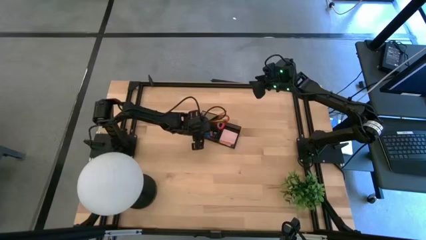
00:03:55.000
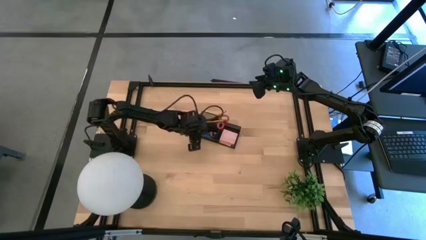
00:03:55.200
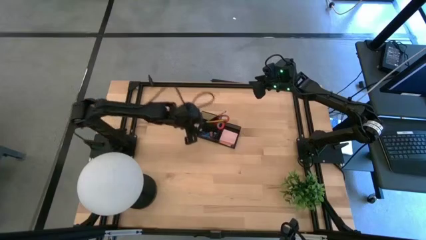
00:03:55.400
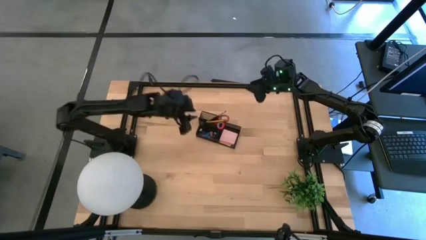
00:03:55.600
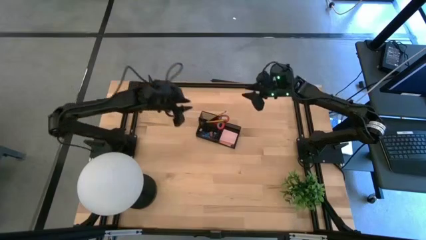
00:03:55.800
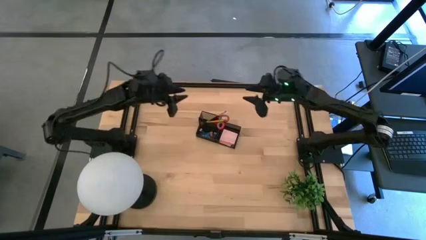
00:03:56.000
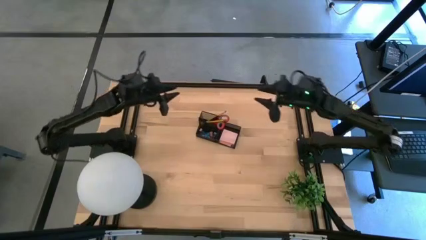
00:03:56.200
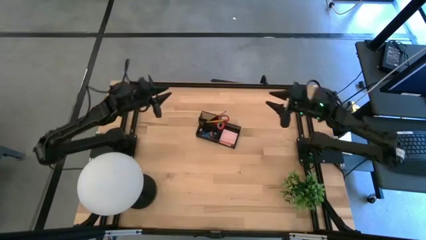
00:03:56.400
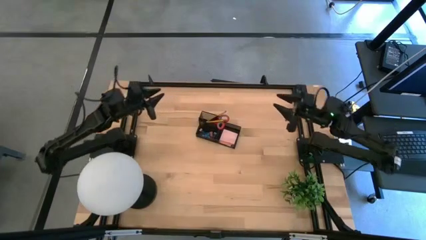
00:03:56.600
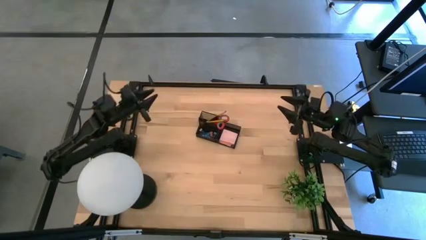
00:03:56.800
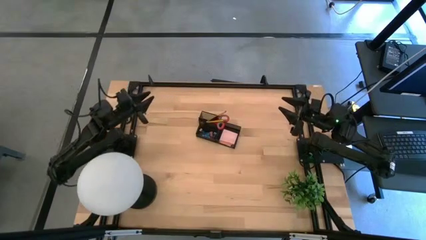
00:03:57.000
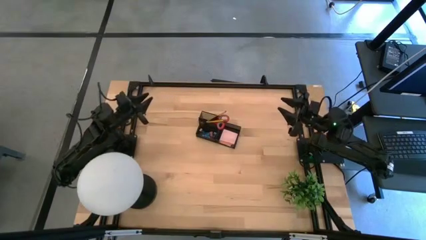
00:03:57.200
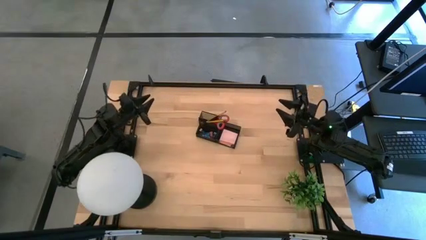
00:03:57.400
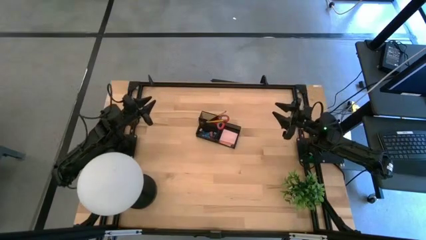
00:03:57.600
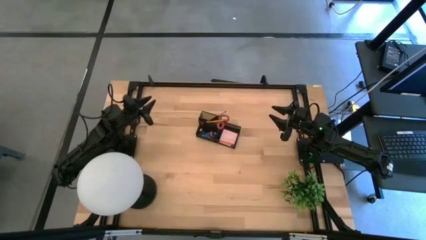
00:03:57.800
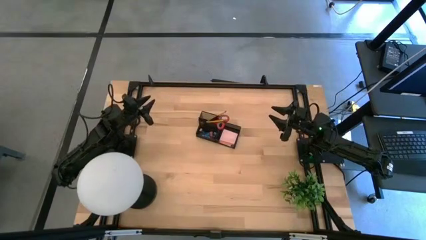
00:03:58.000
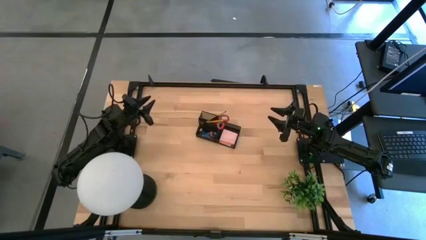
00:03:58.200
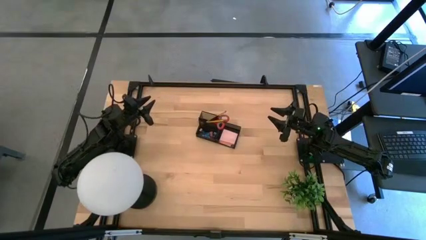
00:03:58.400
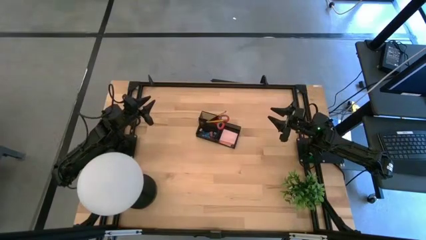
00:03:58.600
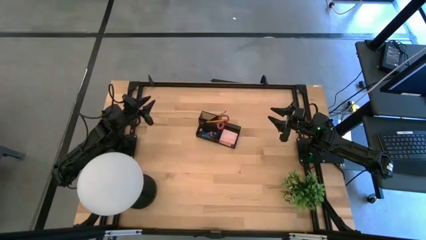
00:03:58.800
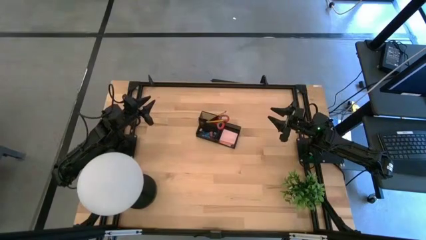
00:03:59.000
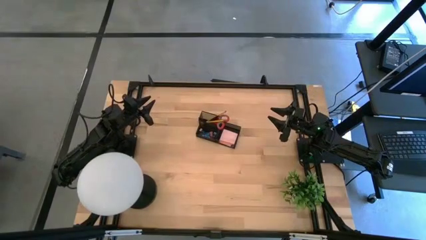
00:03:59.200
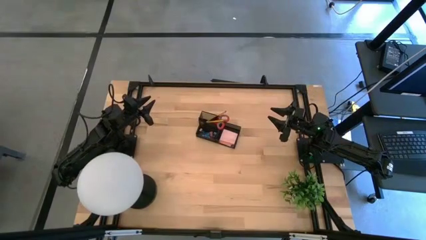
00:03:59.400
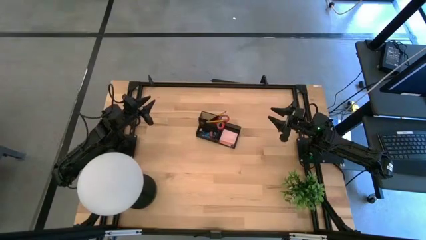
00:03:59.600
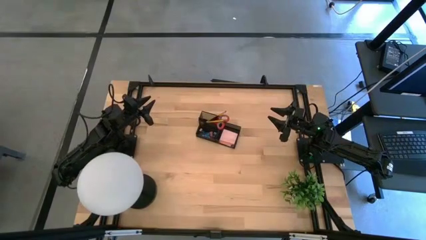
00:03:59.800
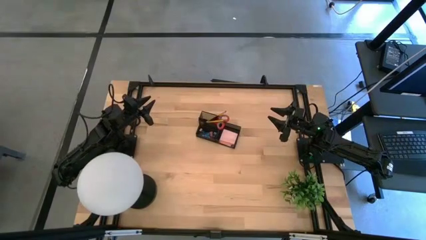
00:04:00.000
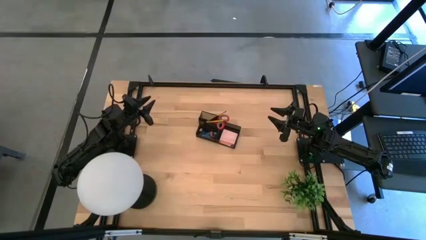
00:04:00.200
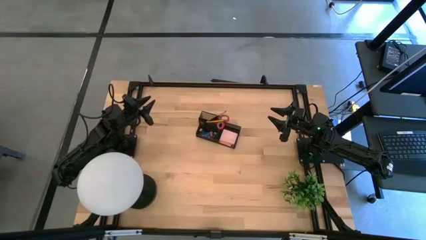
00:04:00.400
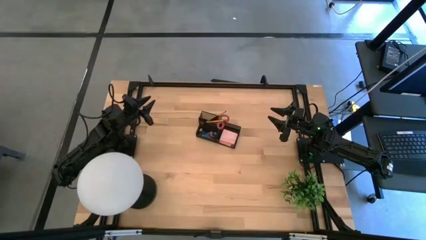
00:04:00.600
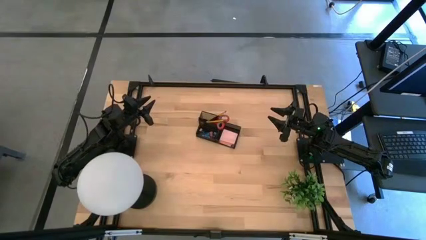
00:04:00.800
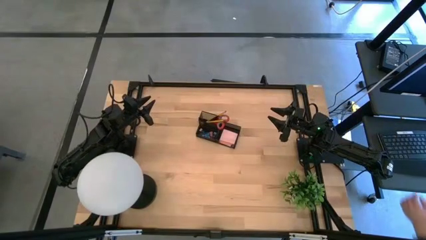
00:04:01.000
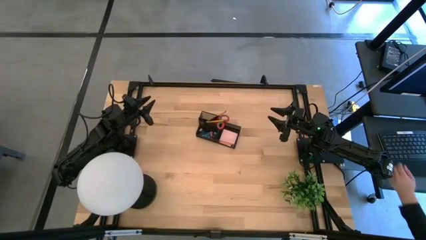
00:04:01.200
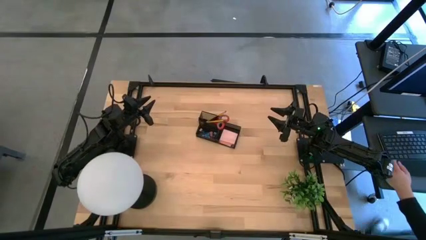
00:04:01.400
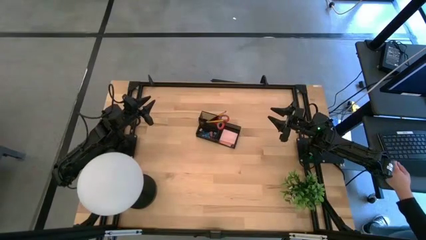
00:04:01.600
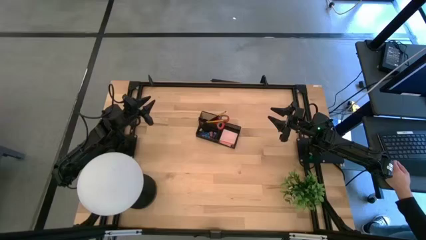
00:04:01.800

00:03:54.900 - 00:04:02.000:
Task: Pick and place office supplies into organizer
Return to Home Position

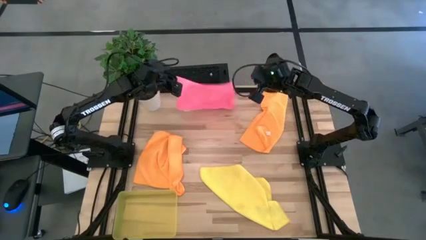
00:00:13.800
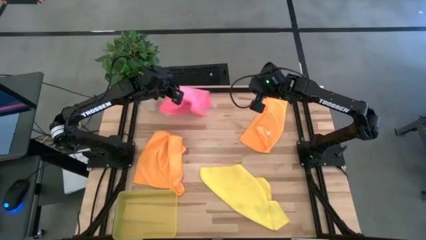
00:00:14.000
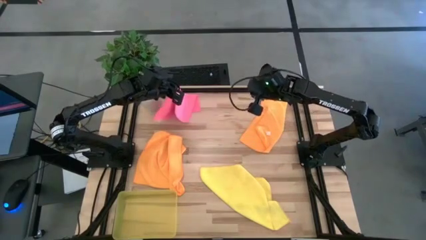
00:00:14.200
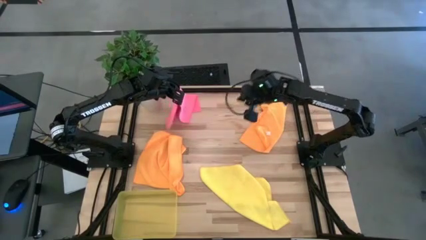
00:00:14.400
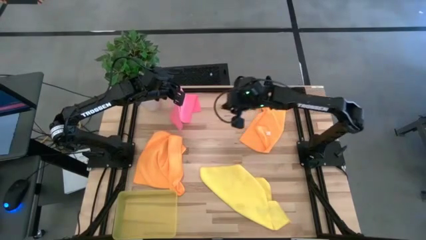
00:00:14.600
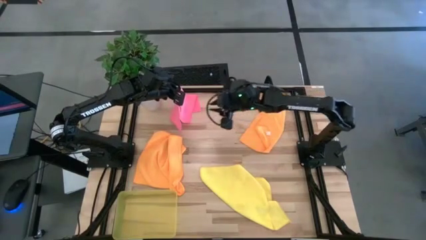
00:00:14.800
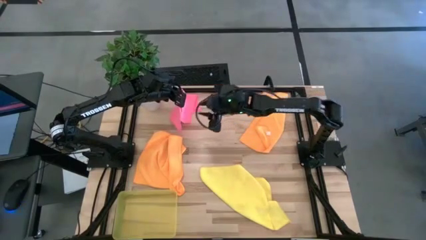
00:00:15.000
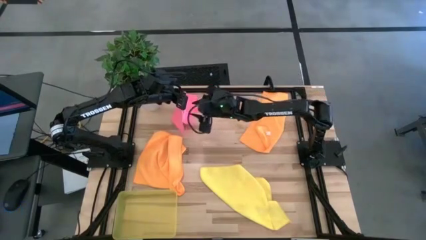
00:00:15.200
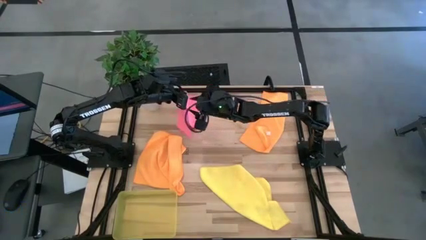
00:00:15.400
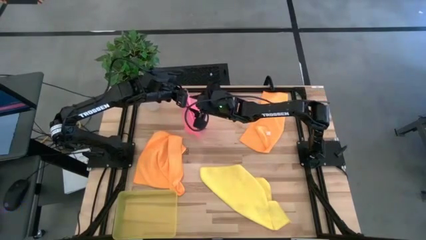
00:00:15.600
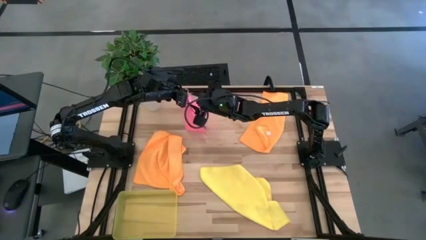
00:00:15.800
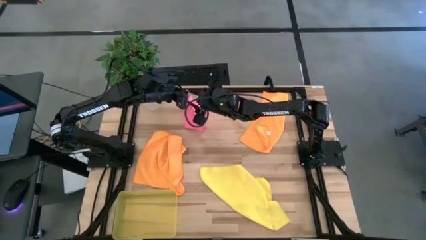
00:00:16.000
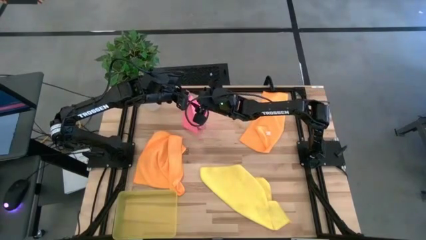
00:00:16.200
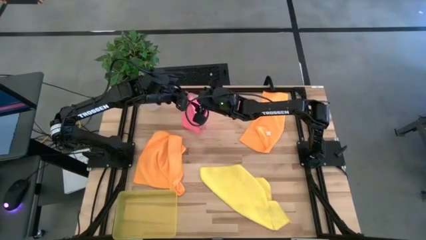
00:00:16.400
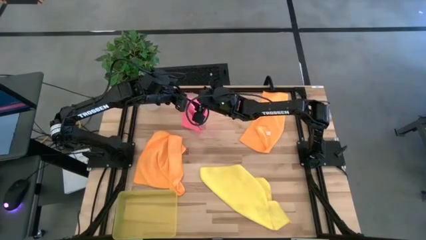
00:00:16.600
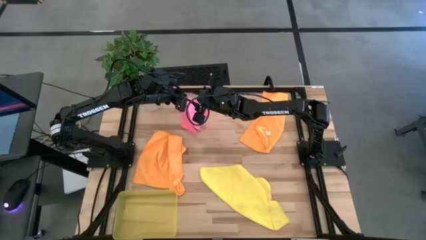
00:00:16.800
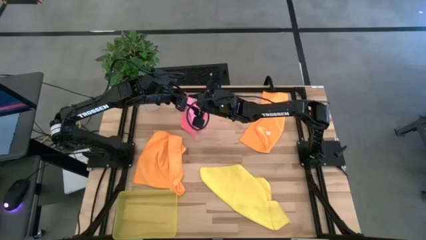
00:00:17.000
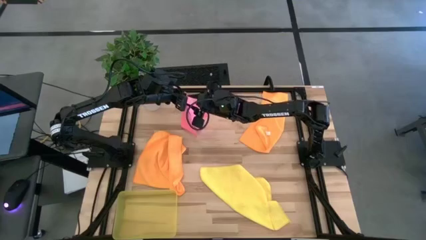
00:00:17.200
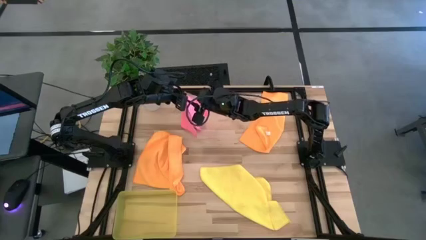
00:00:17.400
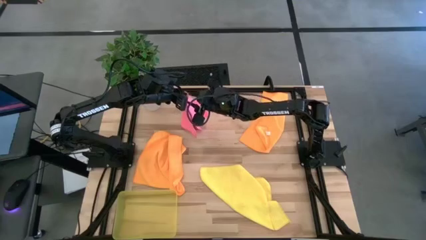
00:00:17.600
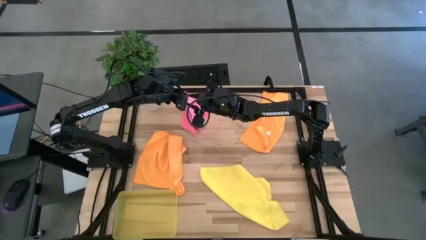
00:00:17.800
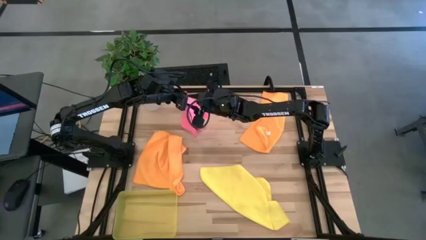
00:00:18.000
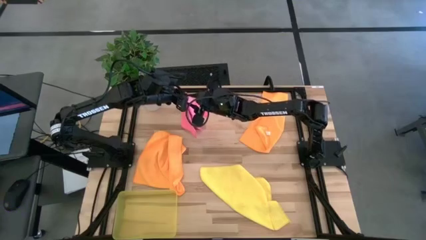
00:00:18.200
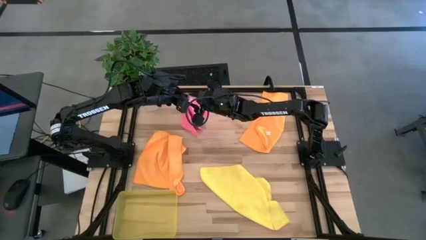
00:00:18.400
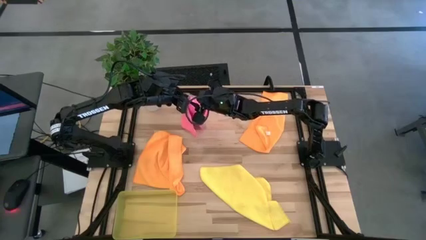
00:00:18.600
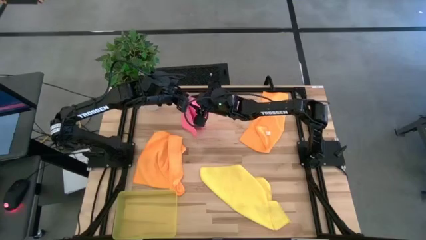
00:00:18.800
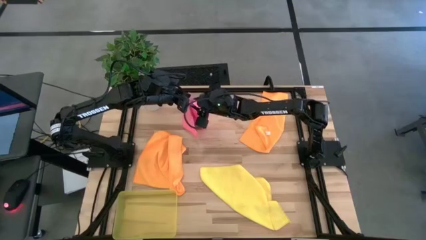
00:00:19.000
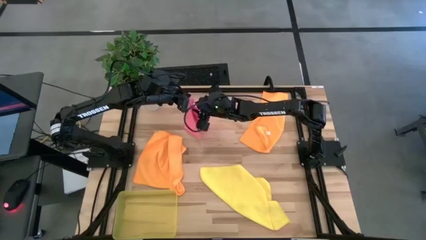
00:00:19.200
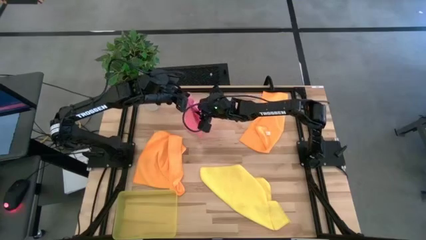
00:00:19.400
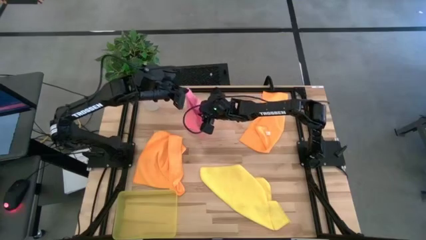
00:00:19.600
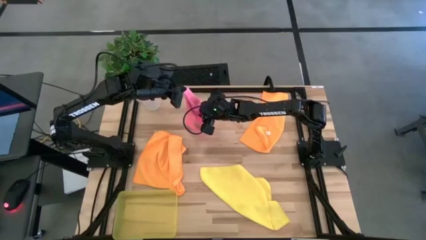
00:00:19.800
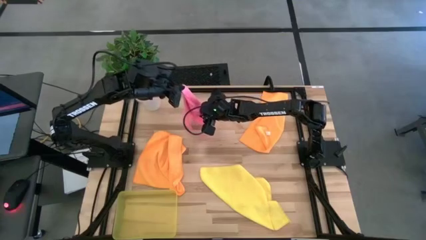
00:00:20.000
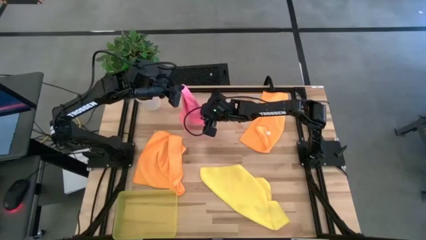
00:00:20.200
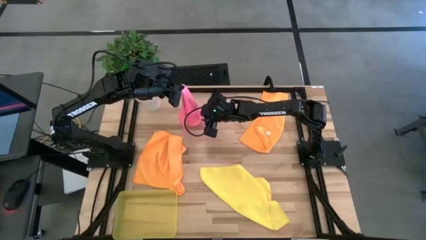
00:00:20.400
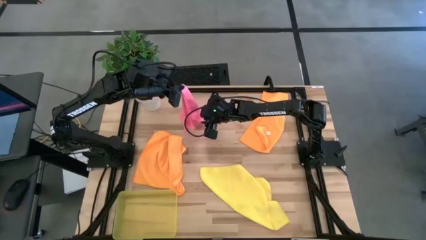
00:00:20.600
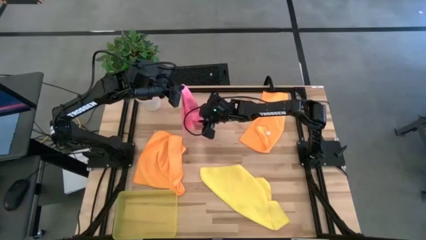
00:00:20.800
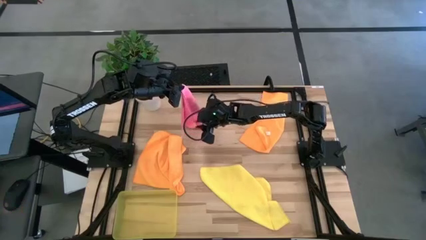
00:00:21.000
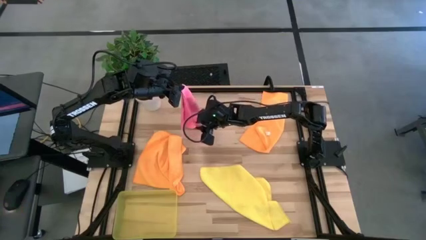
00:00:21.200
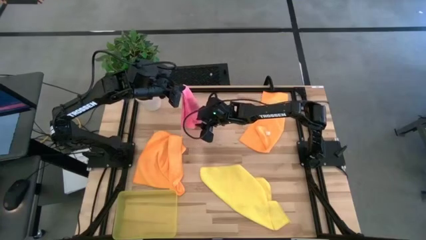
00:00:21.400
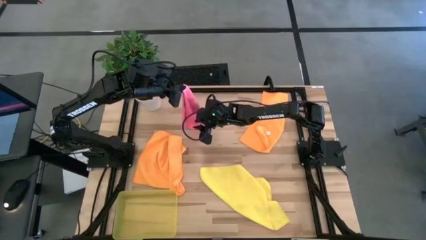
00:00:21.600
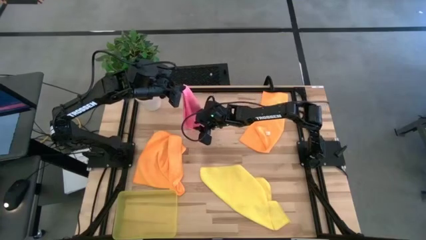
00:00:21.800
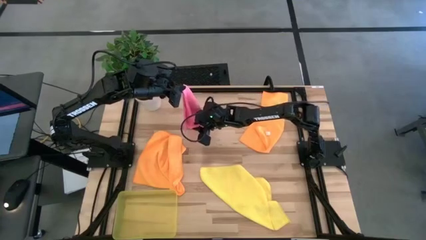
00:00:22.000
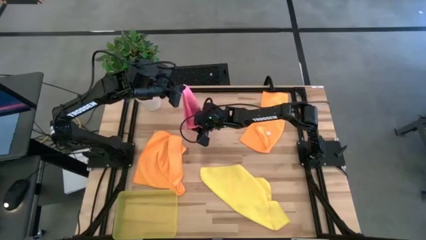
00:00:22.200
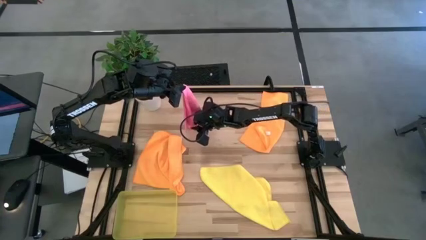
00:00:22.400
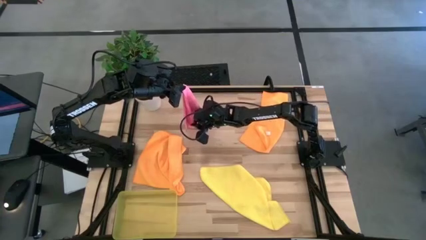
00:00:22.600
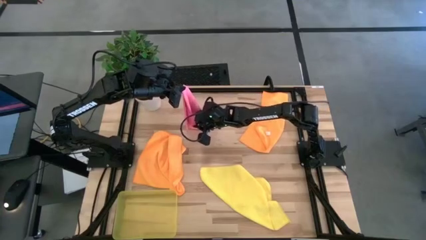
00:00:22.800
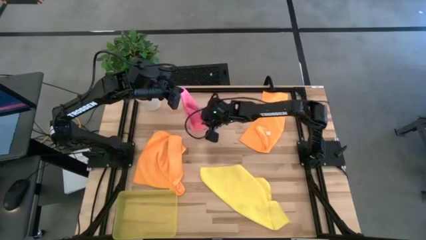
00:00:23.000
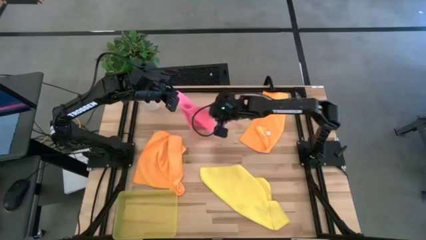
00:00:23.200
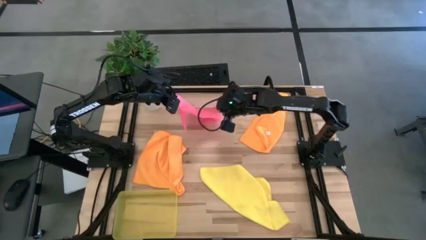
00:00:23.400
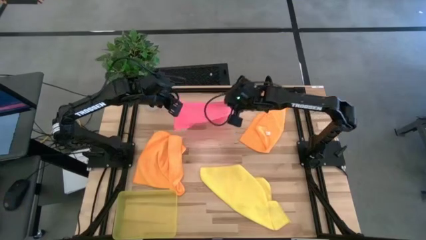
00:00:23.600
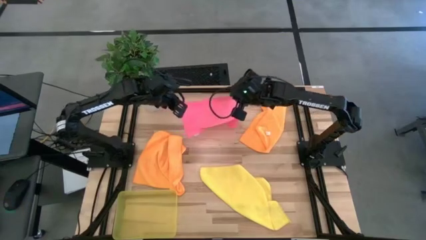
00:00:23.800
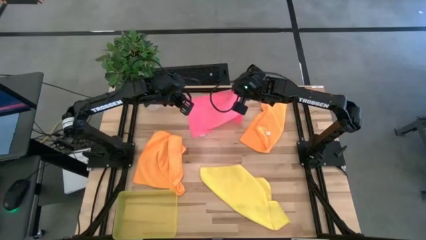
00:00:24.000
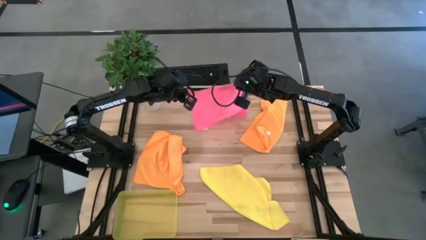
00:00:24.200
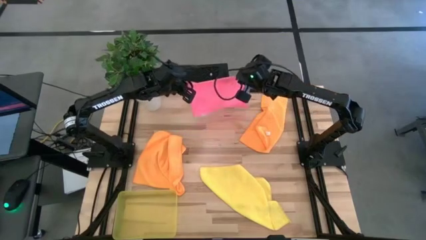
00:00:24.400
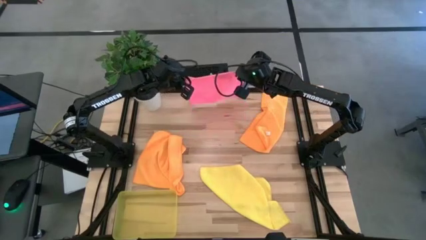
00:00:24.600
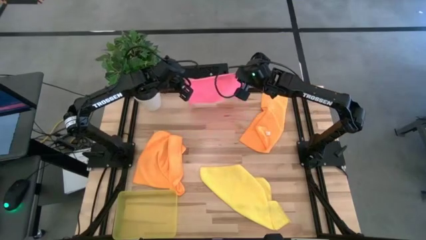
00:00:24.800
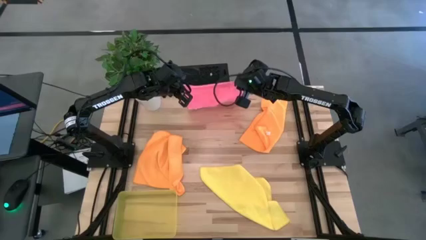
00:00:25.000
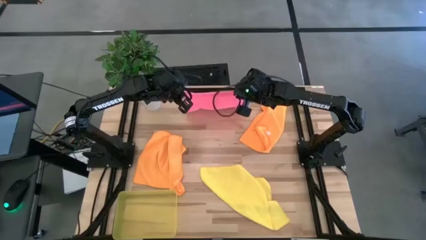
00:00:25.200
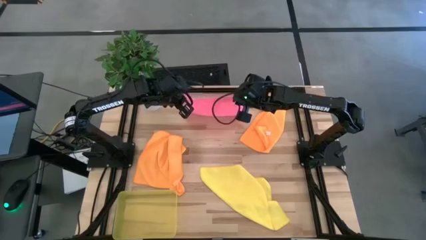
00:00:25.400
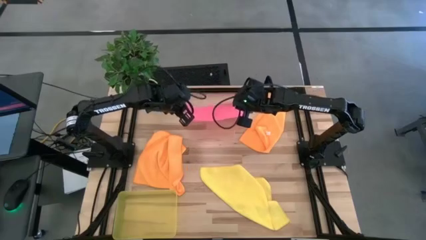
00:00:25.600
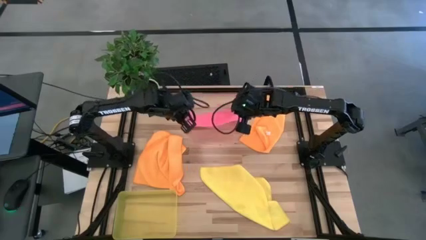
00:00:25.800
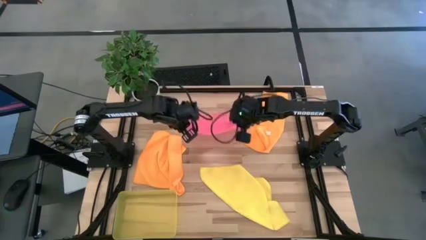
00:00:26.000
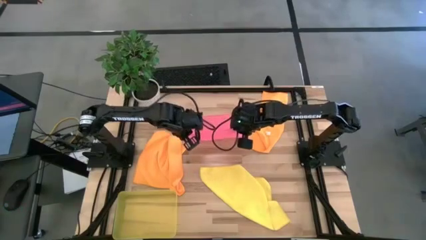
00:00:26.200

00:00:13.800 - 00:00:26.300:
Task: Fold microfiber towels
Fold the pink microfiber towel
